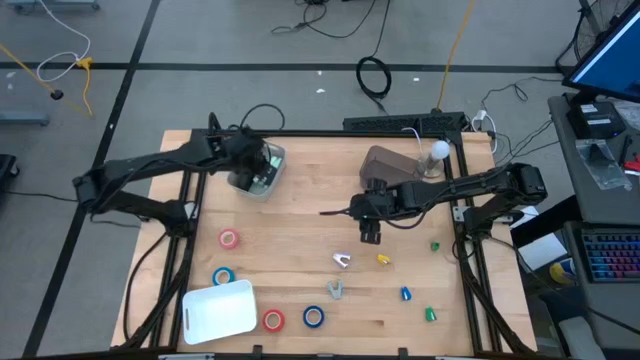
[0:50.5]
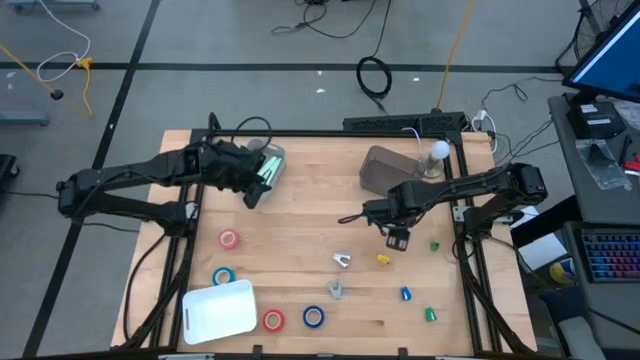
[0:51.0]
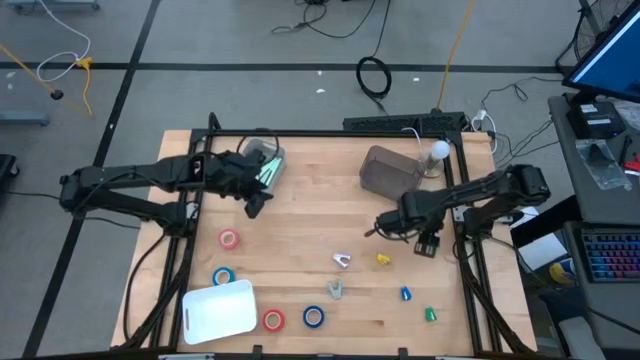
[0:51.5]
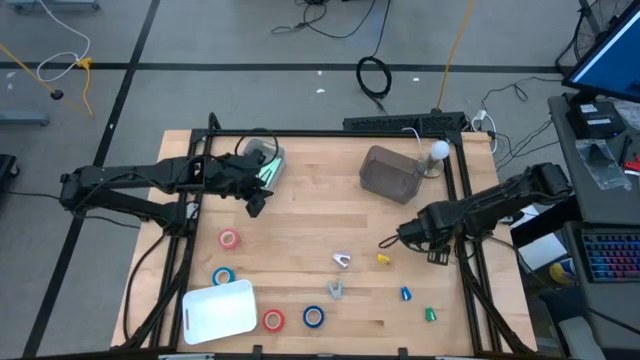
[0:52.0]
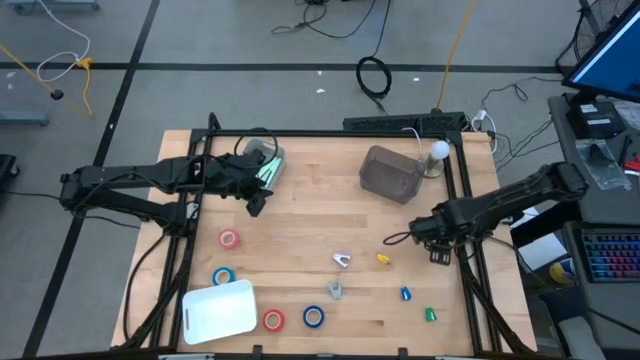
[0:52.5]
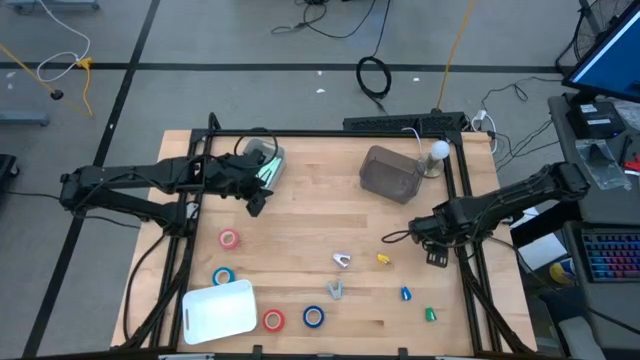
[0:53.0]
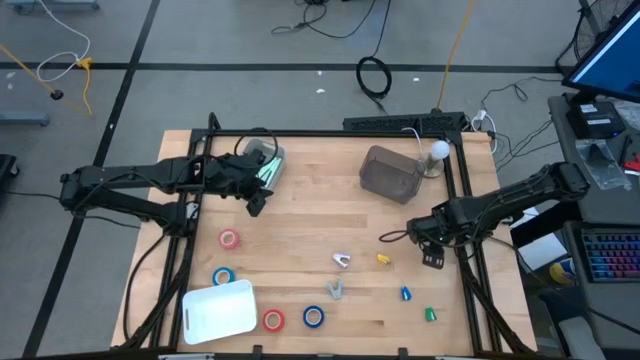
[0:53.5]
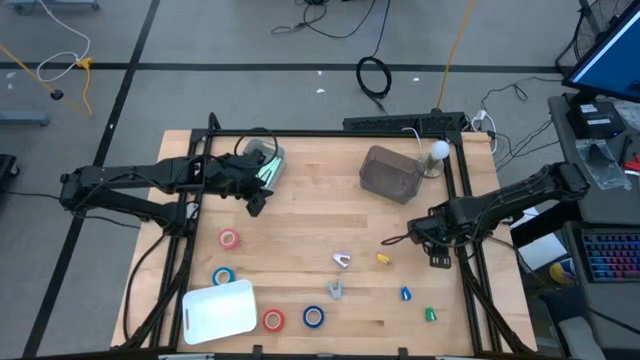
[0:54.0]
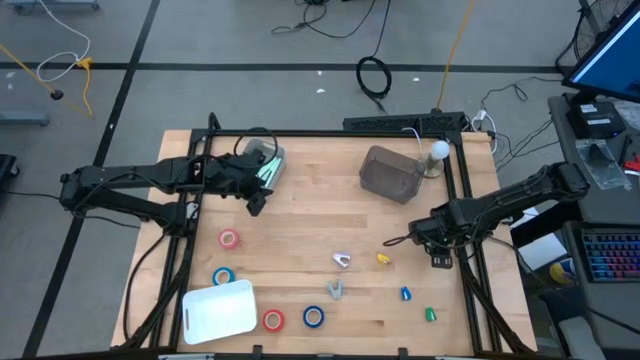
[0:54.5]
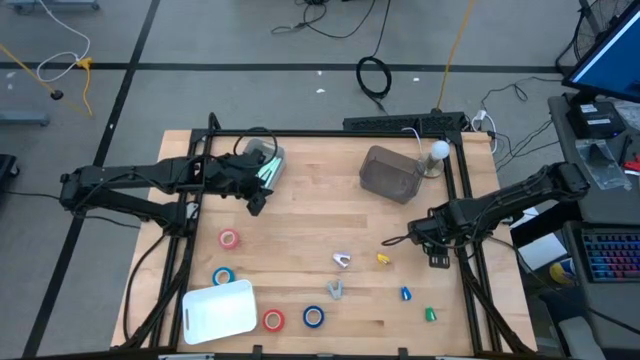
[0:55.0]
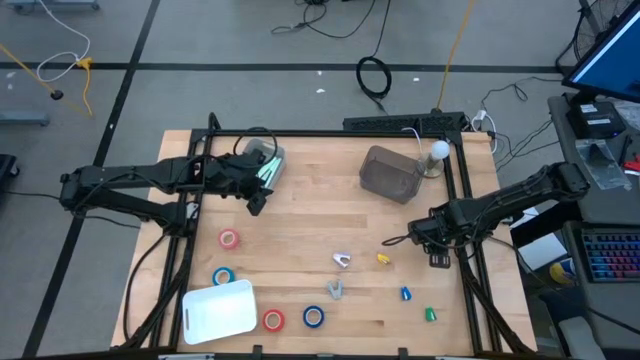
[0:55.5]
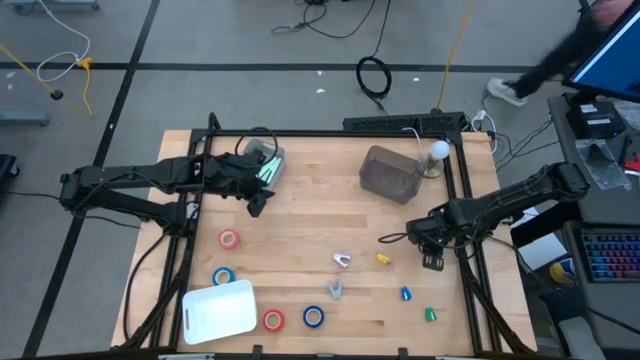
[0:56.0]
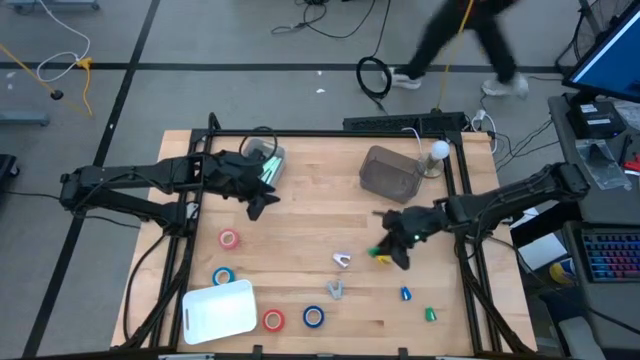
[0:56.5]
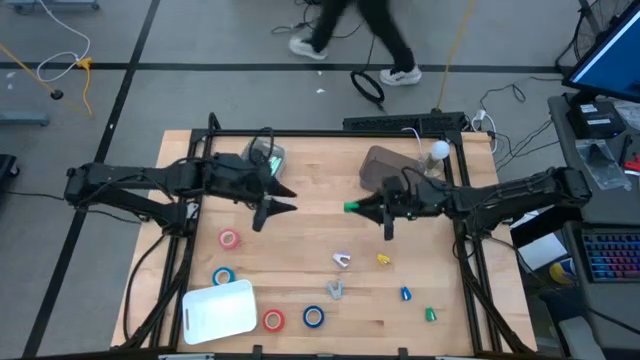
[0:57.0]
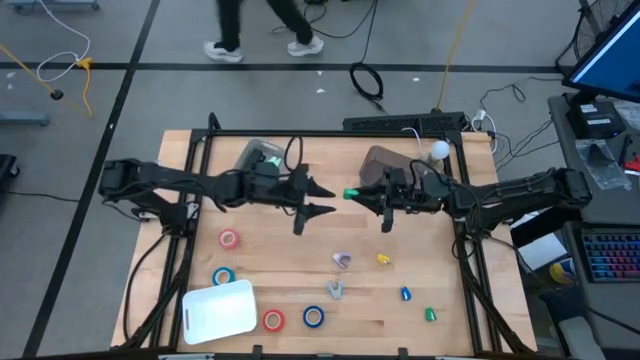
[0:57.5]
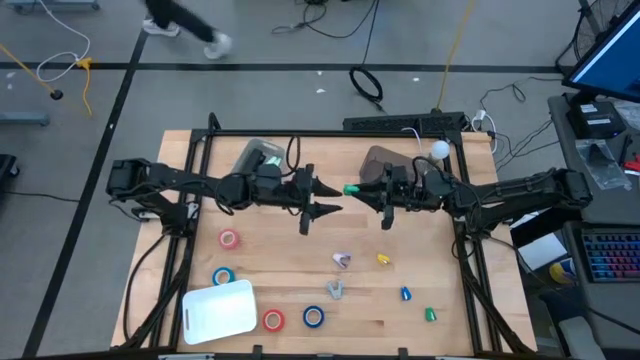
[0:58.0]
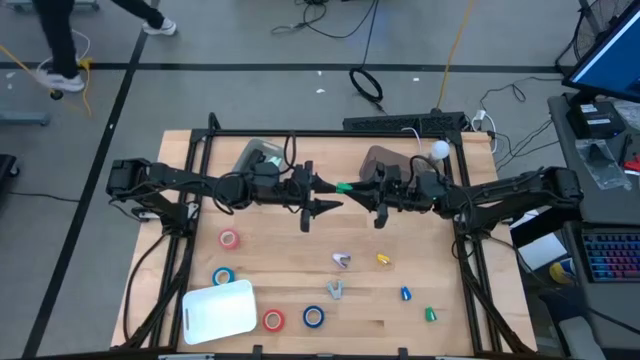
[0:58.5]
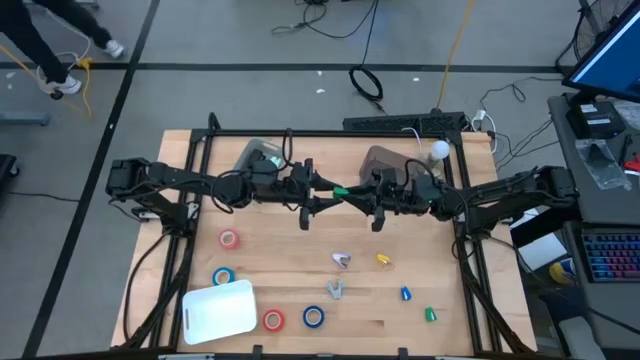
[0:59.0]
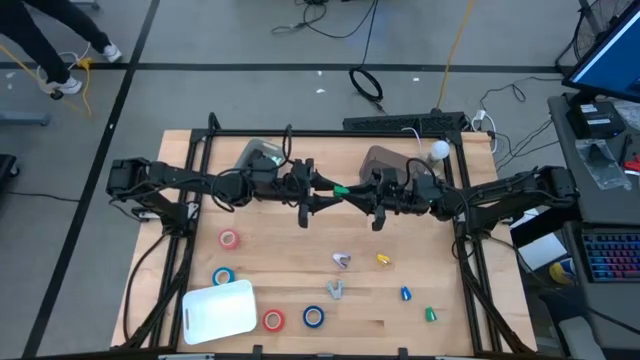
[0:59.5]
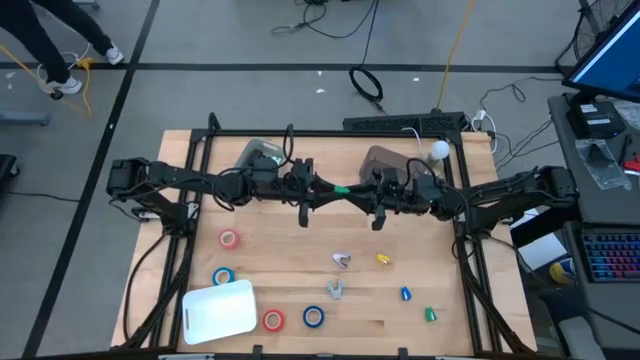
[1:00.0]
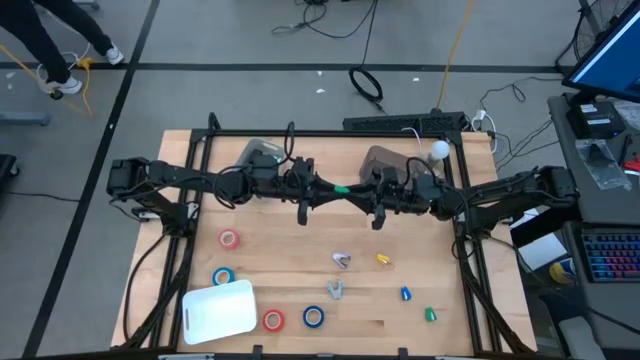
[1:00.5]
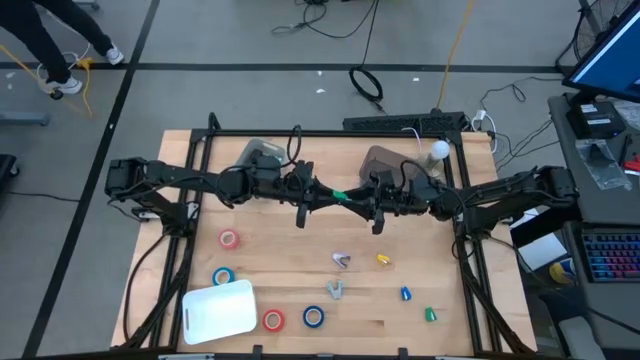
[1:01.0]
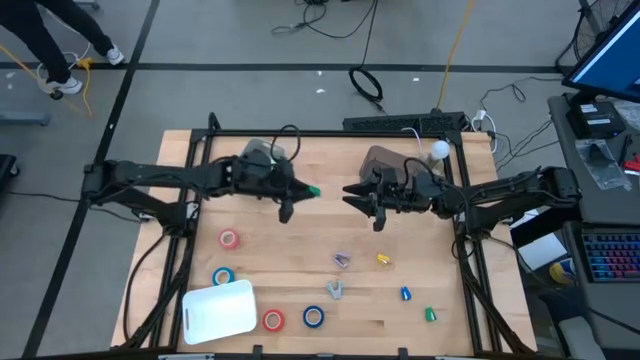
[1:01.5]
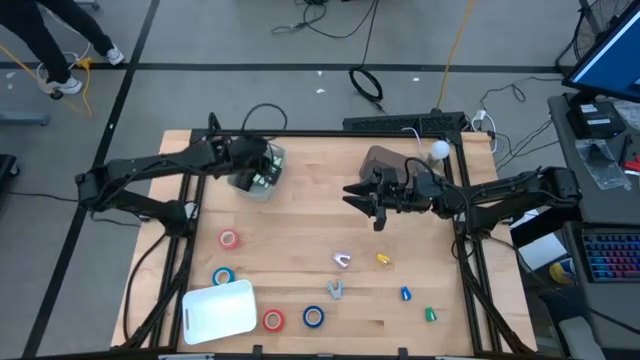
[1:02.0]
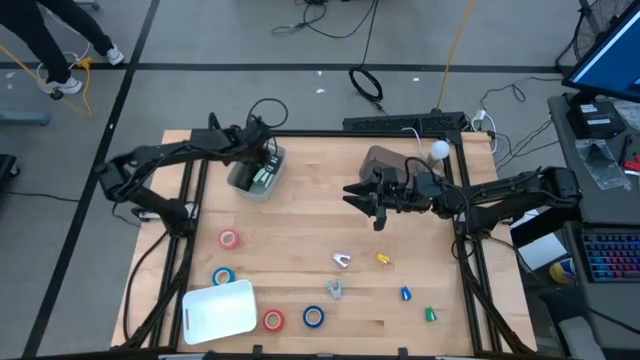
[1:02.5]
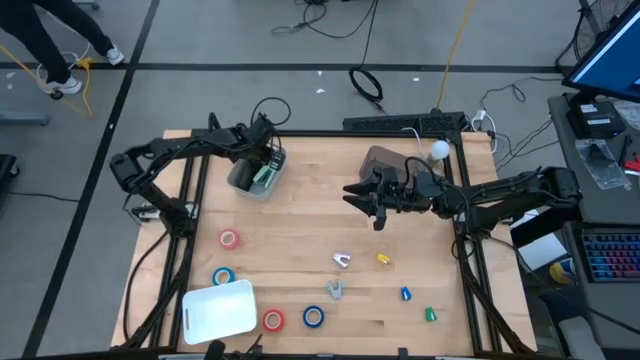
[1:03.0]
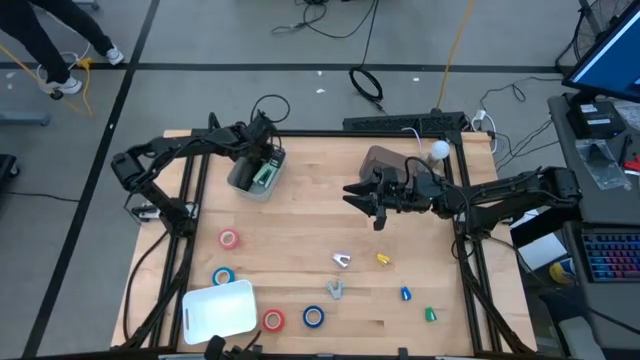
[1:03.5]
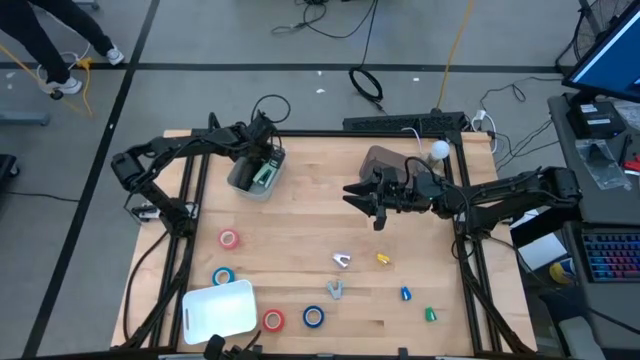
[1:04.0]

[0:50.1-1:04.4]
Task: Pick and place Stapler, Stapler remover, tape
Put the green stapler into the gray bin
